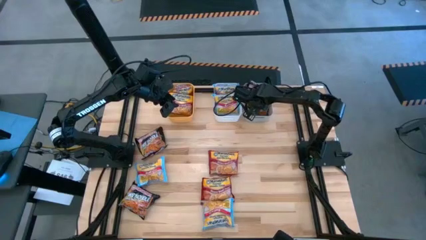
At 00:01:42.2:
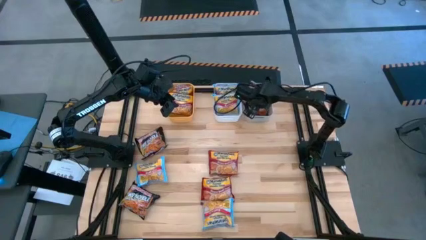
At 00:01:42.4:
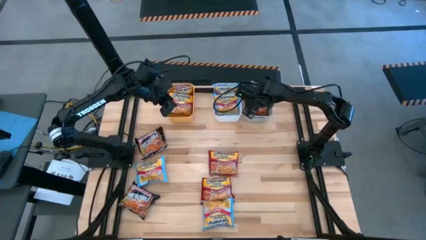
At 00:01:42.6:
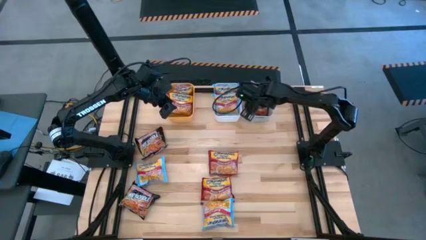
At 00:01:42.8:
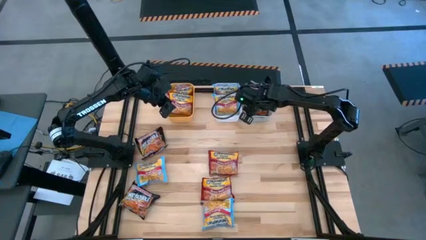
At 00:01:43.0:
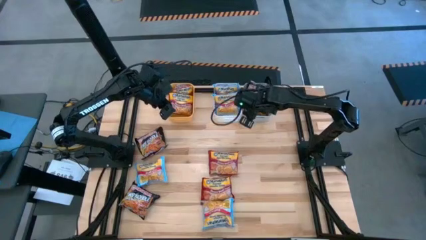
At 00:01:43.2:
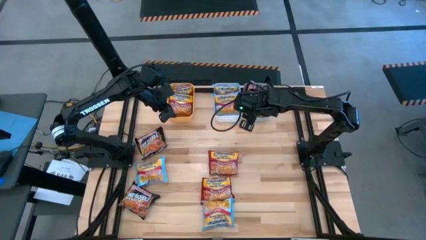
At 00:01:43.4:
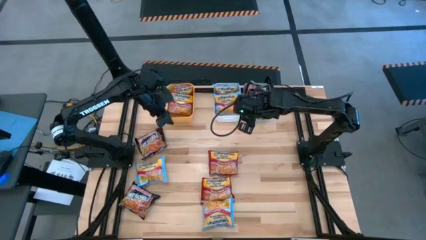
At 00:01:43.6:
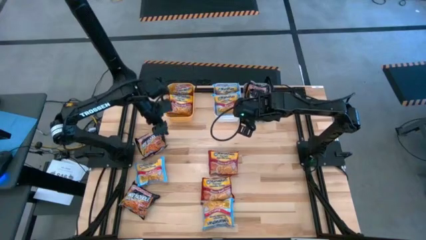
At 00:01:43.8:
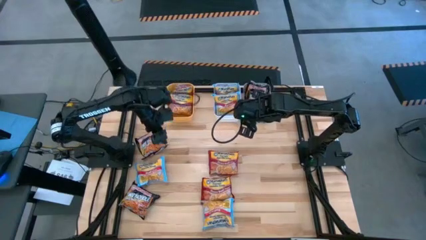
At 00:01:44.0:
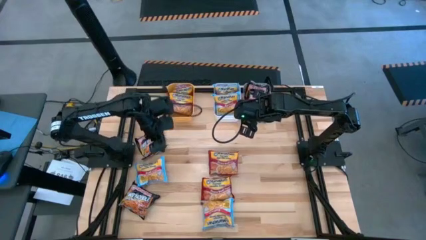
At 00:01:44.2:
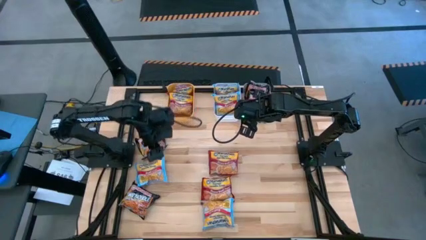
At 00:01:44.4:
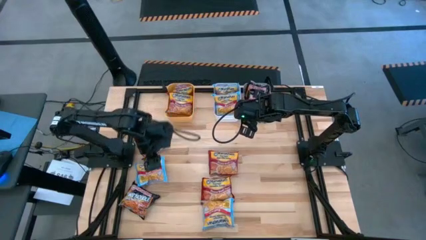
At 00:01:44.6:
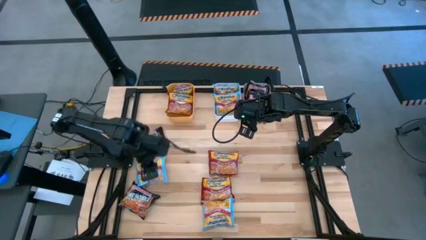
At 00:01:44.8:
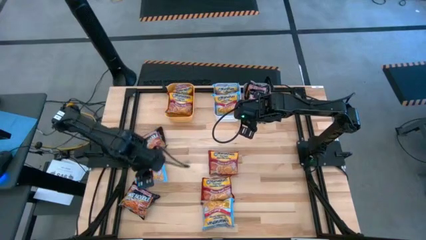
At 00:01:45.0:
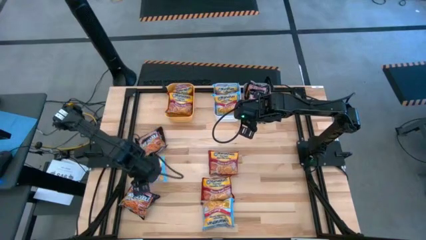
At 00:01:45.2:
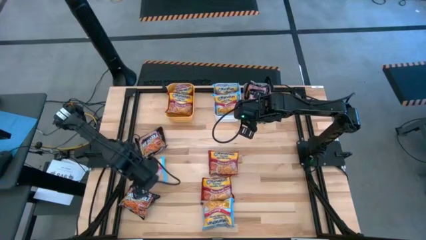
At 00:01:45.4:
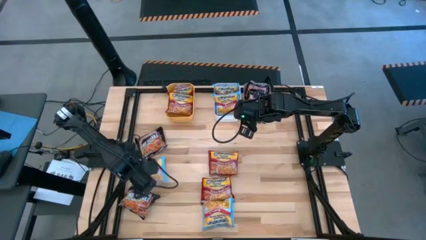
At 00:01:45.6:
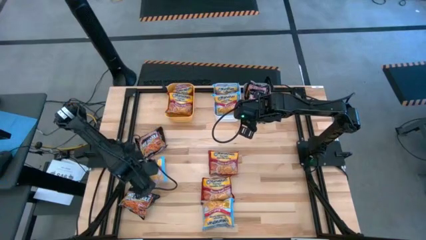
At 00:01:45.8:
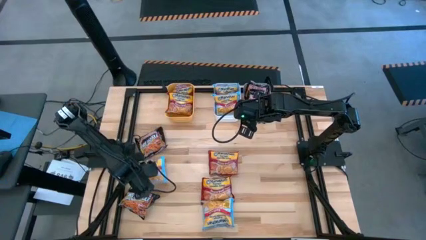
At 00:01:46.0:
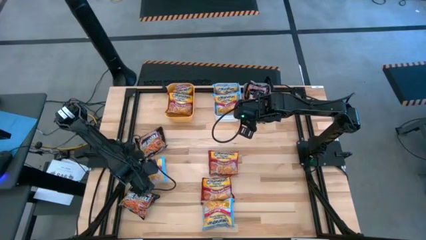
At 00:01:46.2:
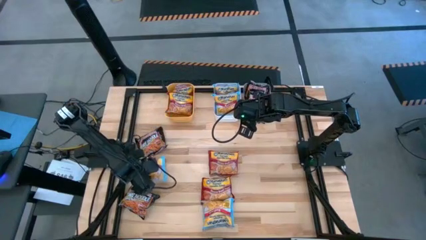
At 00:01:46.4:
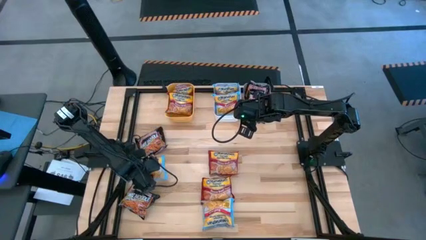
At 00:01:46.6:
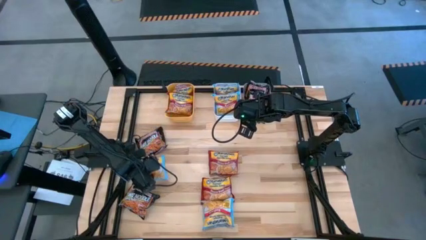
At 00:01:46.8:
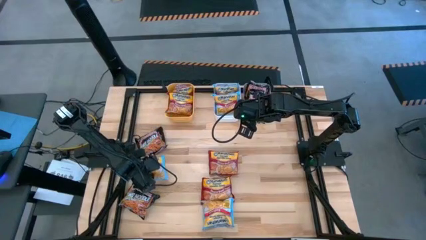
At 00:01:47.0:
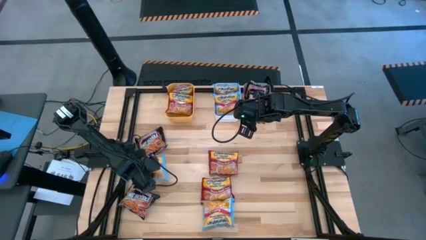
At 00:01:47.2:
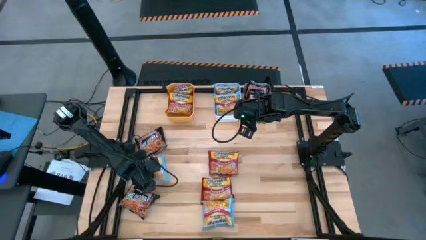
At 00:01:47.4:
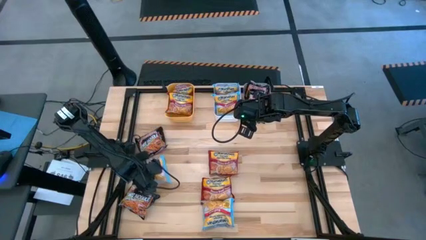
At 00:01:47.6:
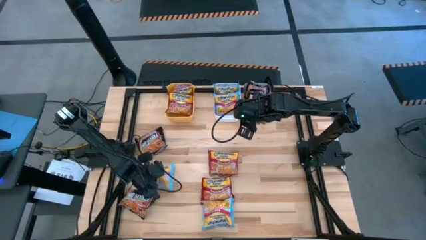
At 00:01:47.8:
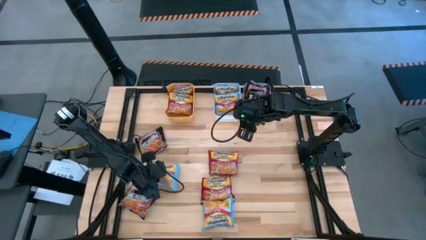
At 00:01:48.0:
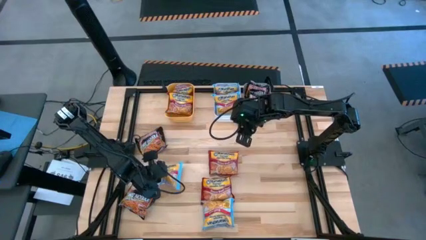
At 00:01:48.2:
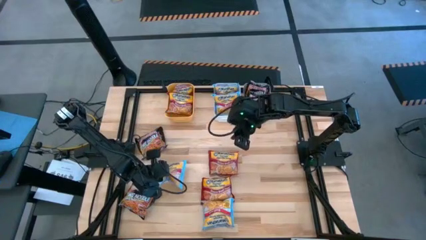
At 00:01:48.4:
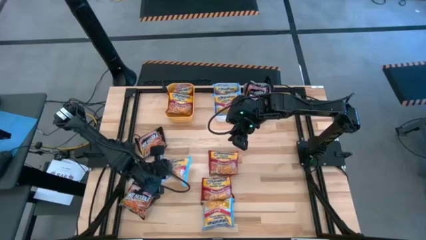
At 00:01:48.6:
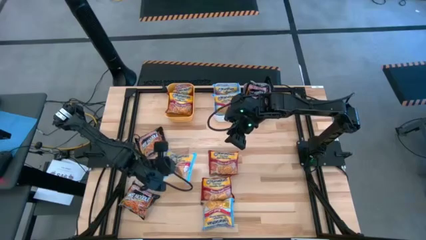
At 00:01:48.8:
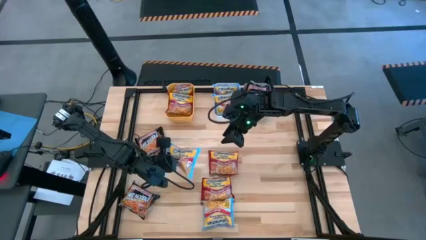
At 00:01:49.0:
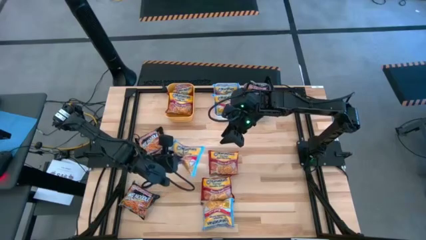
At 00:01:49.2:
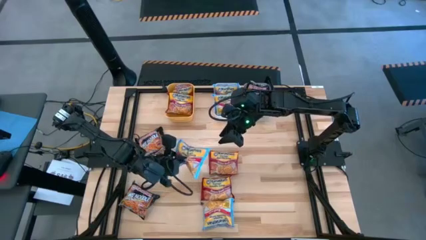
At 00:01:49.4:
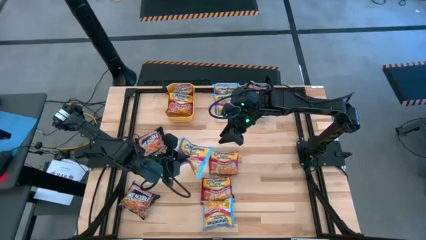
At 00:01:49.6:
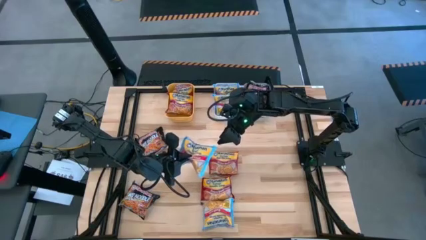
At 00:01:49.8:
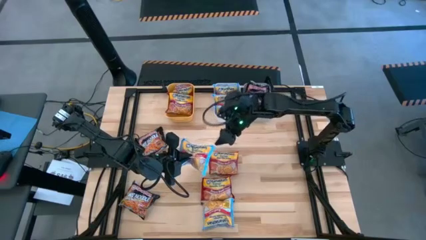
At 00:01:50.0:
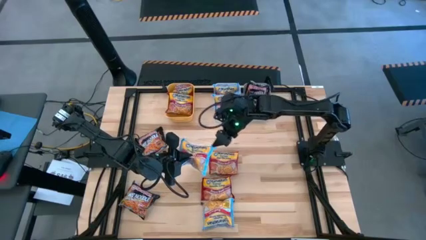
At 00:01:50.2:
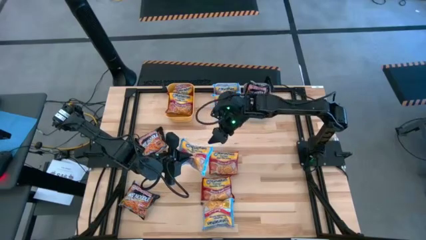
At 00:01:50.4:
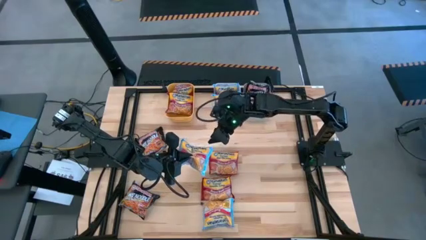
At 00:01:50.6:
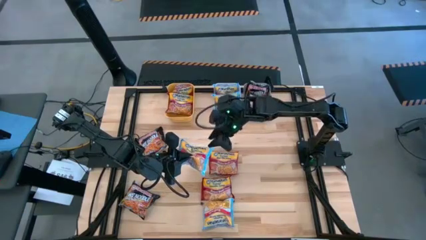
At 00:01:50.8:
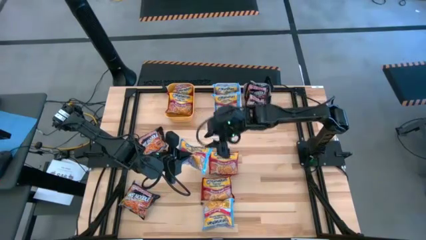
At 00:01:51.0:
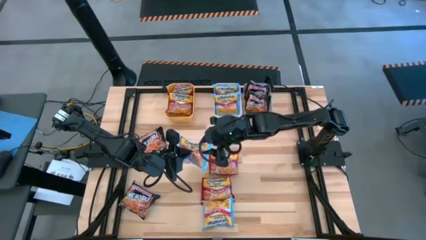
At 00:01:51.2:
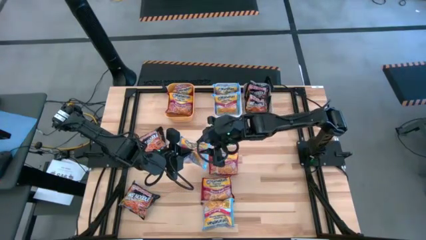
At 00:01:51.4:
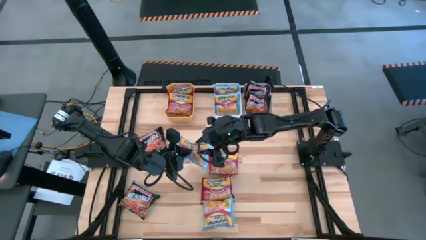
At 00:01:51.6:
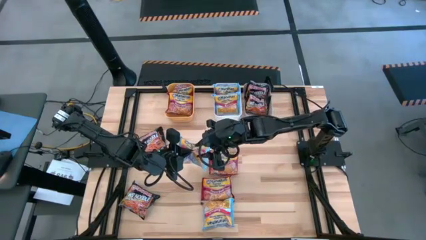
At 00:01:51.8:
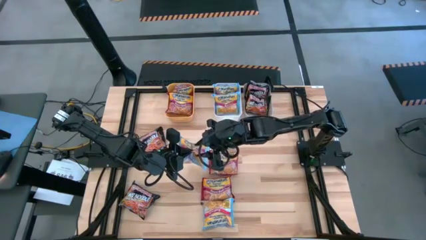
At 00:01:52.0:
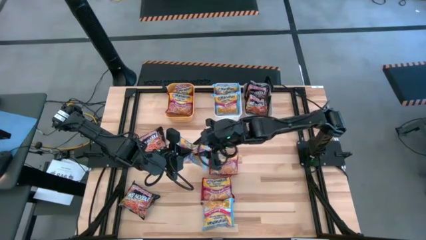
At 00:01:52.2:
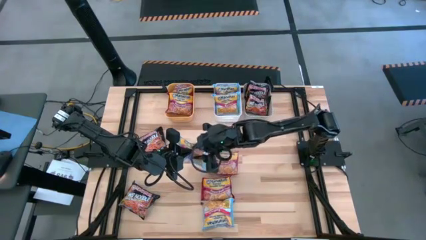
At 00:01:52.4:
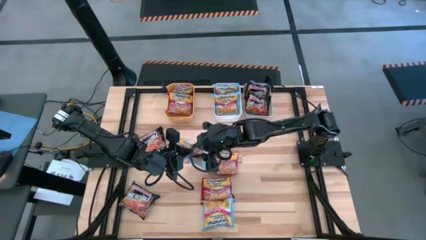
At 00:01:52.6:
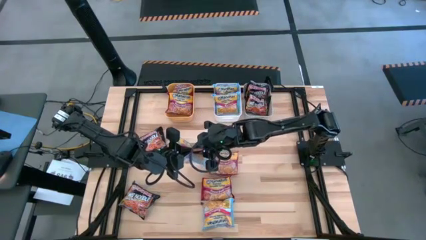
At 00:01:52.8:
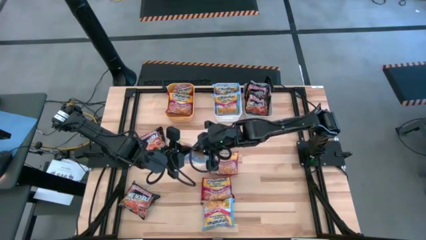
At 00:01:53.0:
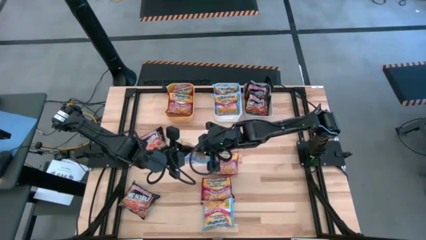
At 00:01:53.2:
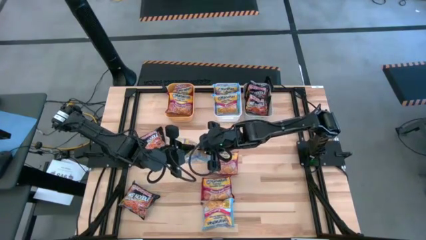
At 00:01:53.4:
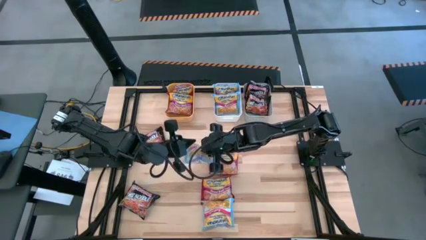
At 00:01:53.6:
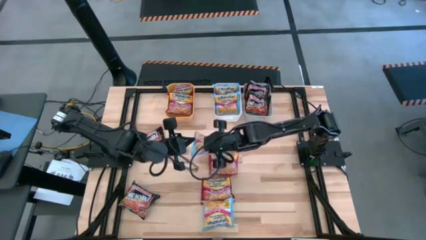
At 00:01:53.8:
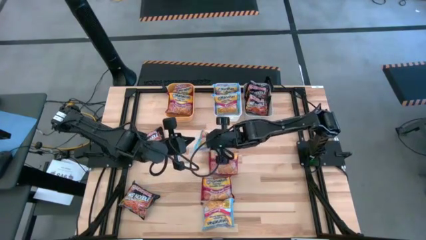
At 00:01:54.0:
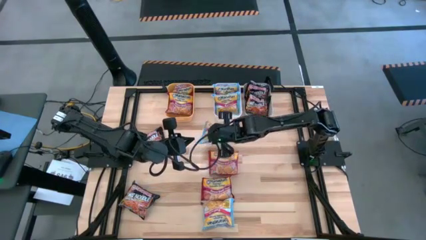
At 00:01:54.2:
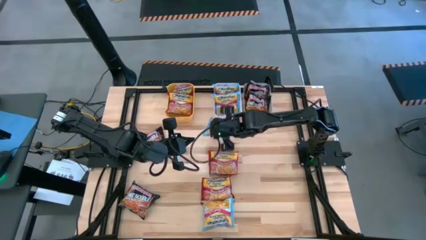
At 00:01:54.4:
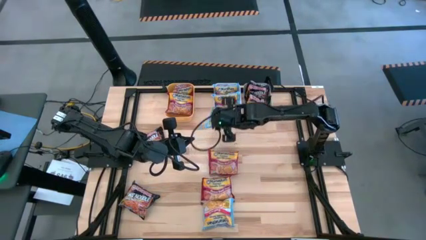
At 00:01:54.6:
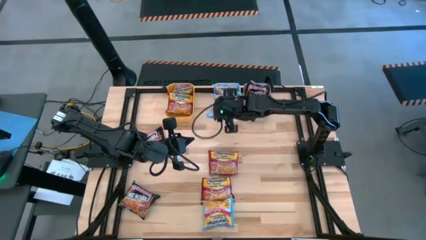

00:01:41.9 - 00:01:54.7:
Task: Sort Maruchan noodles
Put the blue noodle pack into the white bin

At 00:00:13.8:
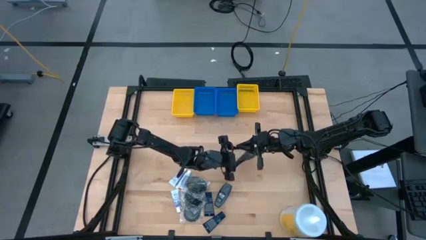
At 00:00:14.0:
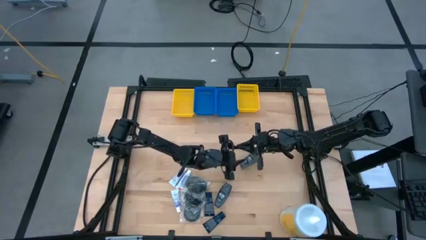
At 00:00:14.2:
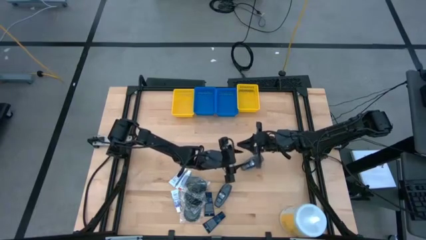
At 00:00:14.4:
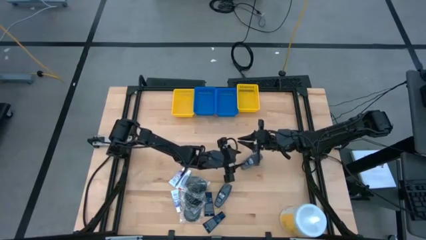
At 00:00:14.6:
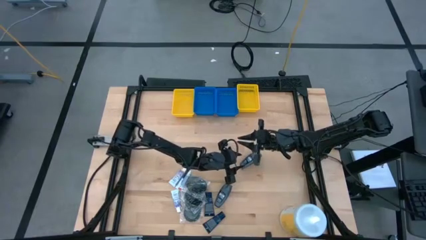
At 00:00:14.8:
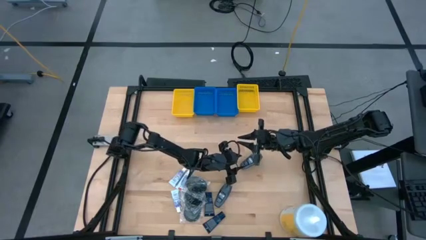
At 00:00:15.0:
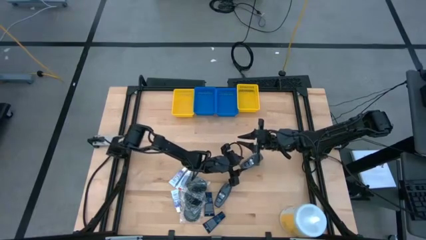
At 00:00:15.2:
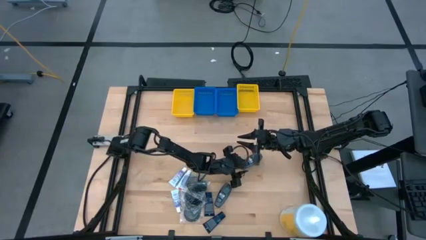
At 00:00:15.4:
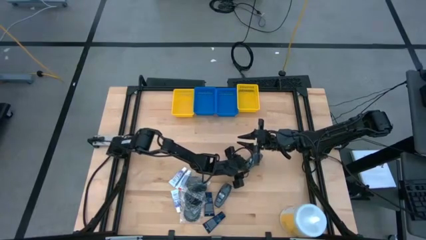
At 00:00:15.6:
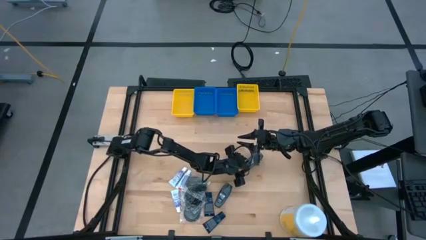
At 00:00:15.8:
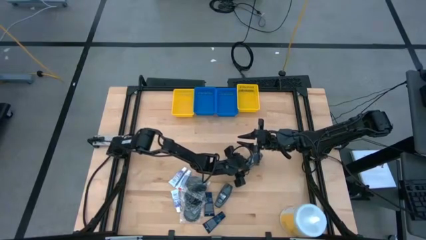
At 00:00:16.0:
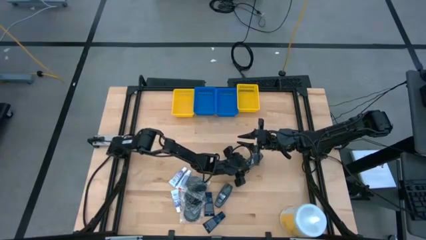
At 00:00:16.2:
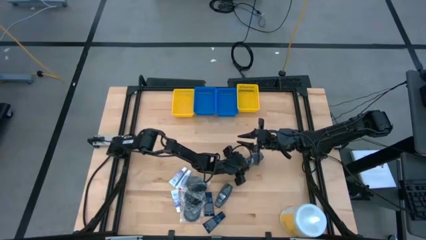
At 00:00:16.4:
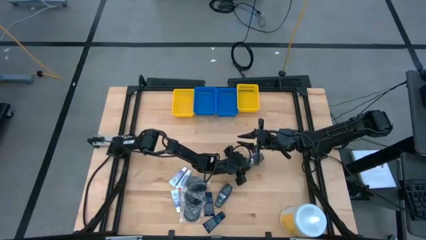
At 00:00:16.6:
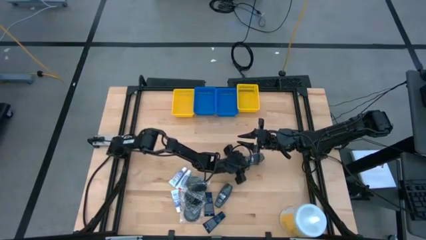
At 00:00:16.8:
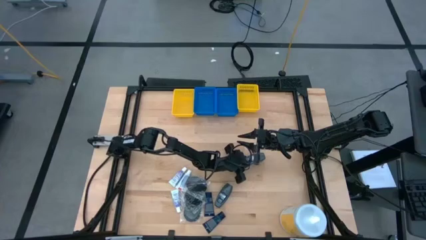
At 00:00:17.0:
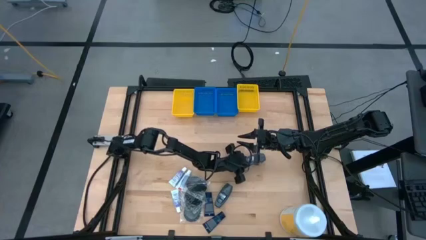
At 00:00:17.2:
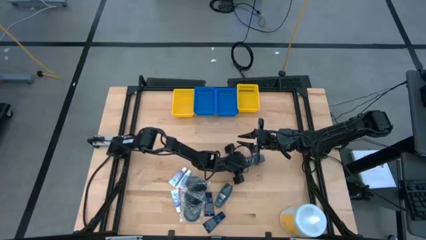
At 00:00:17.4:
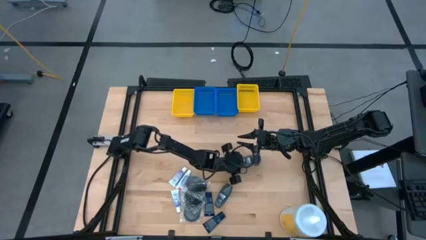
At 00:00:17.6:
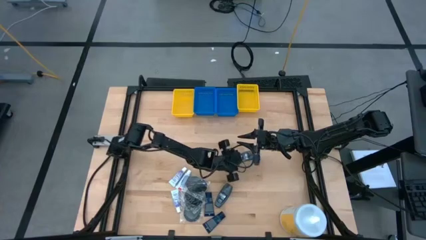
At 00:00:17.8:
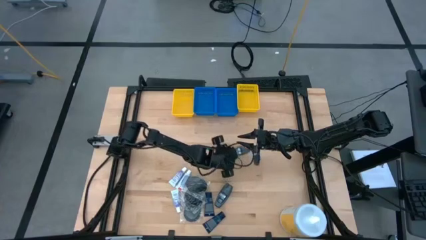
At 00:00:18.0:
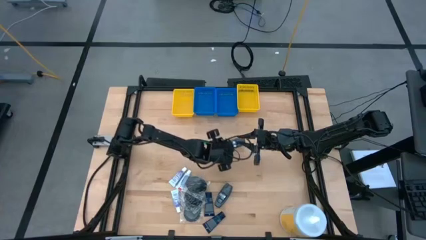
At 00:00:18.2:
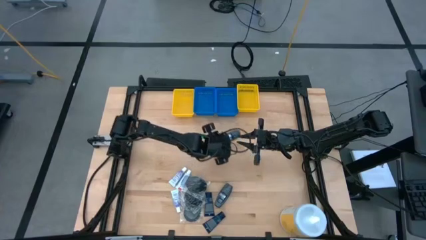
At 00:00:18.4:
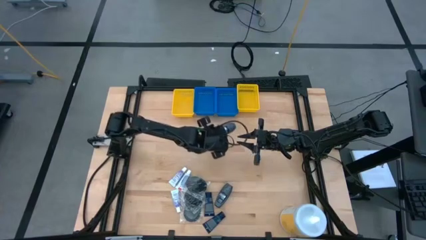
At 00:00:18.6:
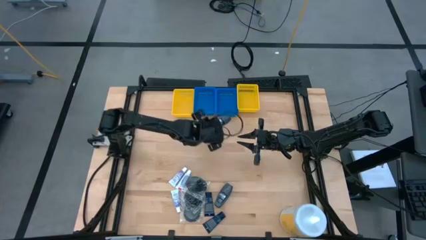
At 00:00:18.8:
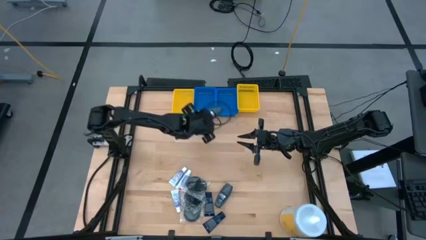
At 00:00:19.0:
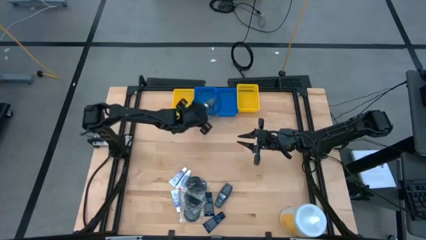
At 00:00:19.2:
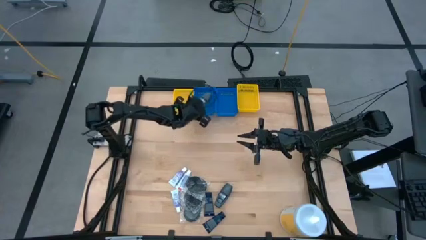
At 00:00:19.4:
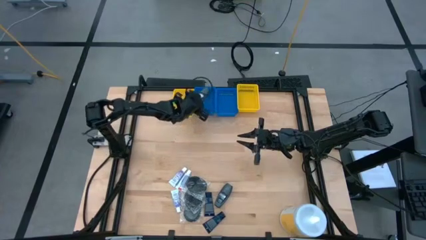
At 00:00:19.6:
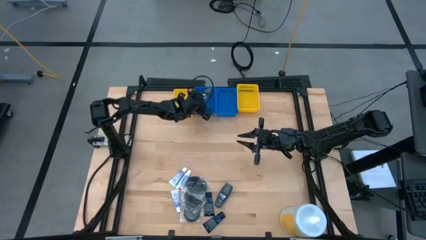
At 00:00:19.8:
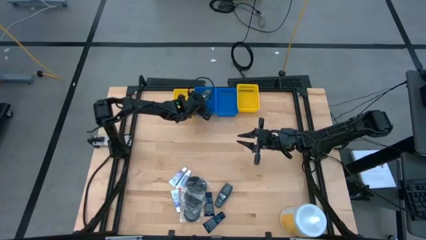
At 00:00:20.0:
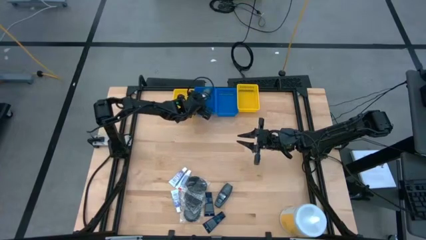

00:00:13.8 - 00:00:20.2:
Task: Pick & Place Travel size toiletries
Put the black deodorant into the left blue bin
